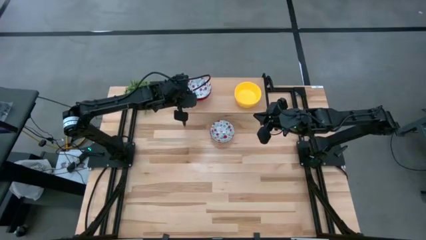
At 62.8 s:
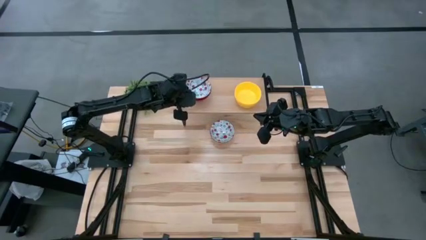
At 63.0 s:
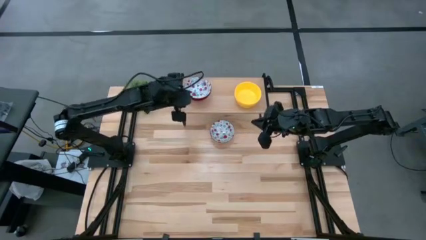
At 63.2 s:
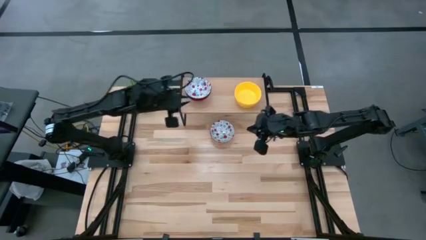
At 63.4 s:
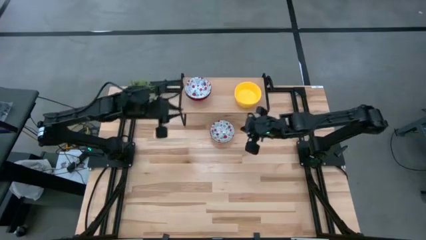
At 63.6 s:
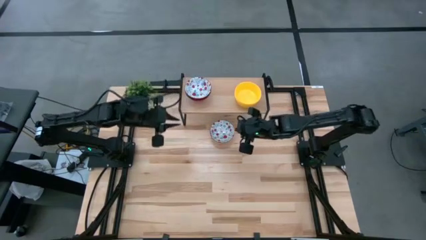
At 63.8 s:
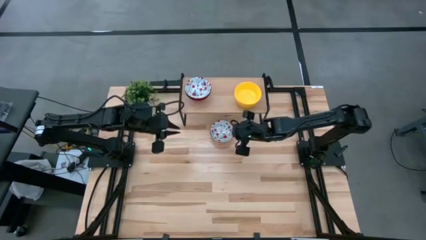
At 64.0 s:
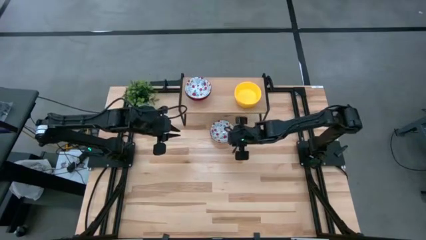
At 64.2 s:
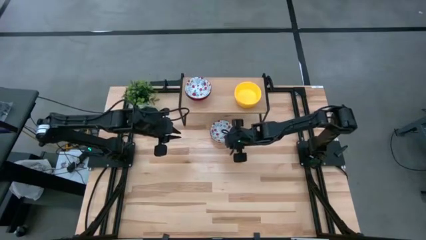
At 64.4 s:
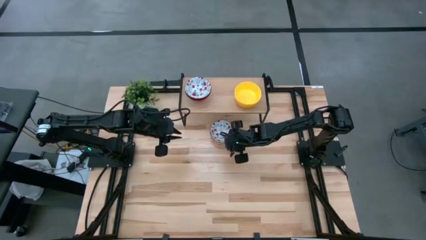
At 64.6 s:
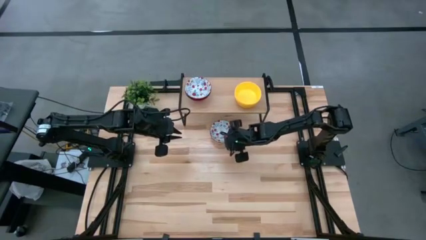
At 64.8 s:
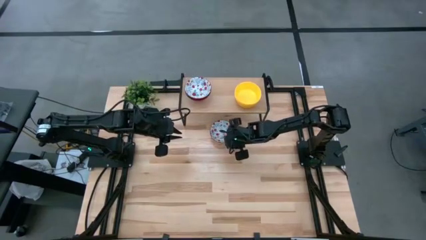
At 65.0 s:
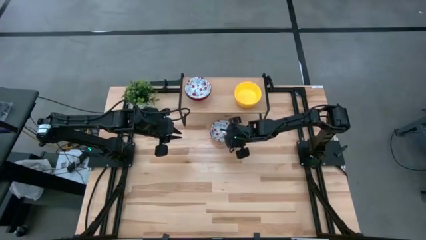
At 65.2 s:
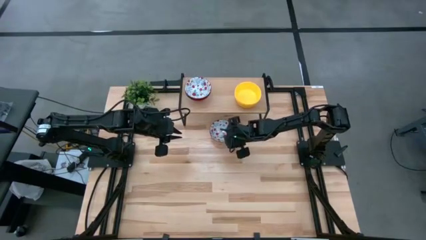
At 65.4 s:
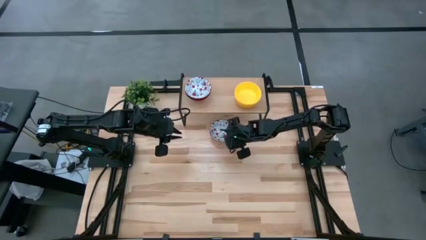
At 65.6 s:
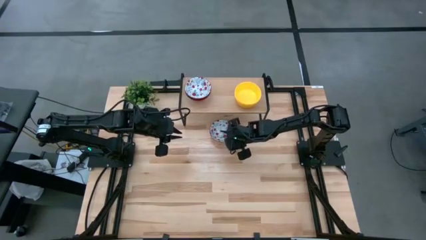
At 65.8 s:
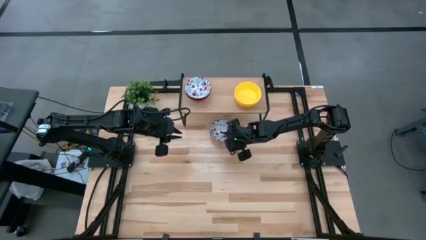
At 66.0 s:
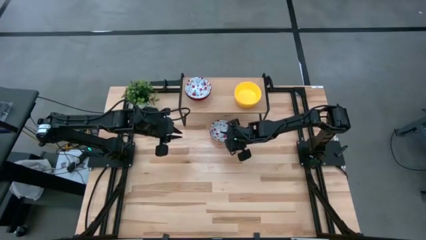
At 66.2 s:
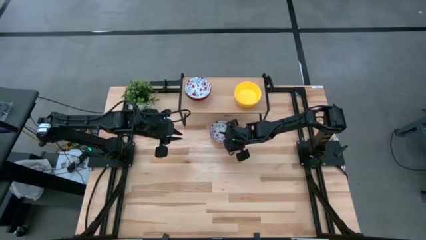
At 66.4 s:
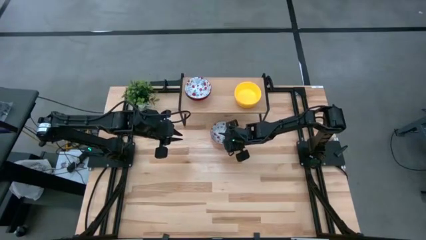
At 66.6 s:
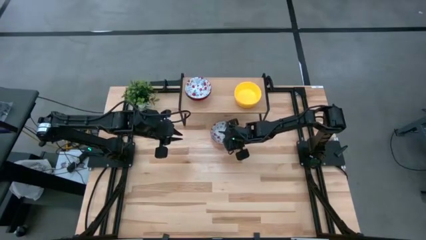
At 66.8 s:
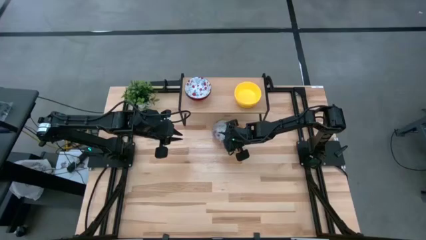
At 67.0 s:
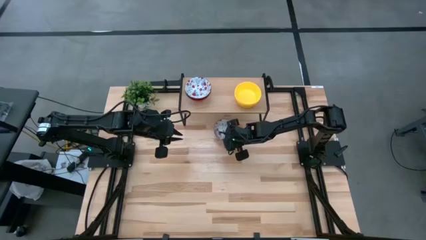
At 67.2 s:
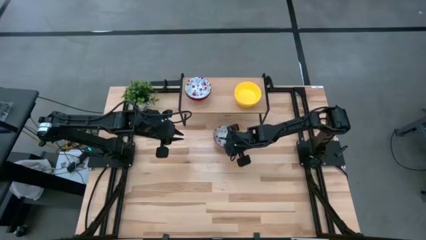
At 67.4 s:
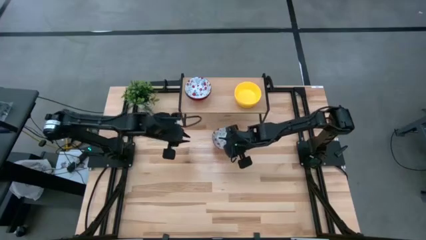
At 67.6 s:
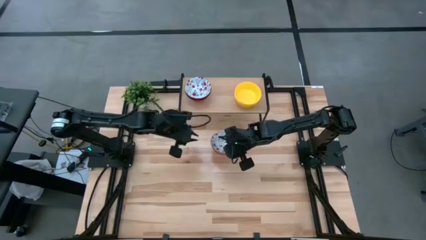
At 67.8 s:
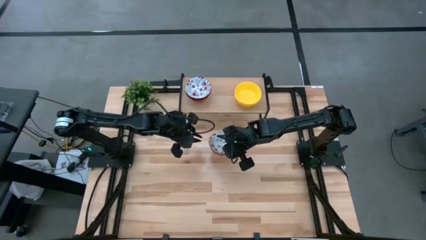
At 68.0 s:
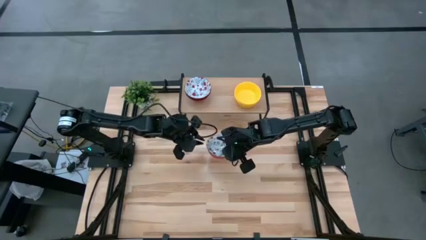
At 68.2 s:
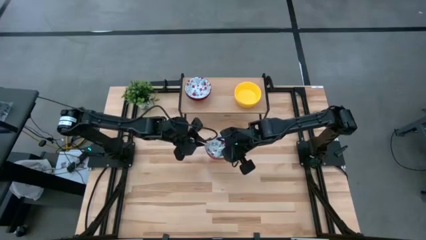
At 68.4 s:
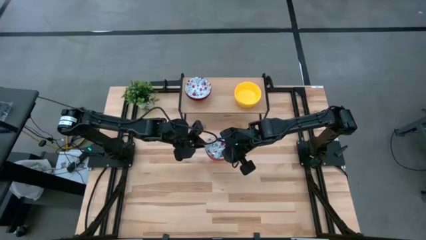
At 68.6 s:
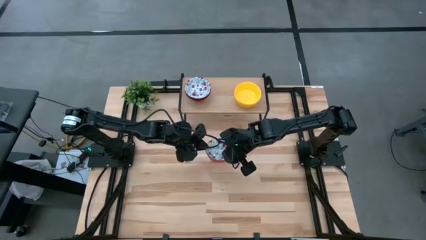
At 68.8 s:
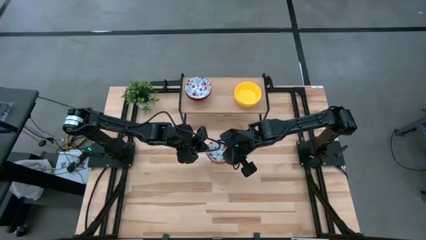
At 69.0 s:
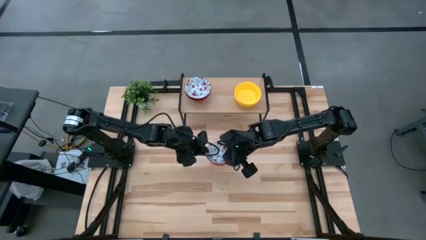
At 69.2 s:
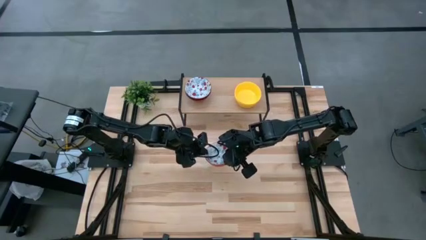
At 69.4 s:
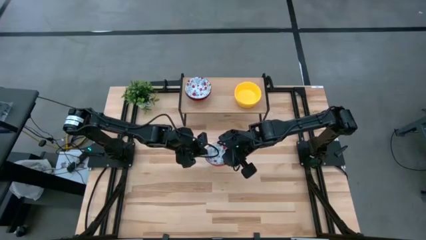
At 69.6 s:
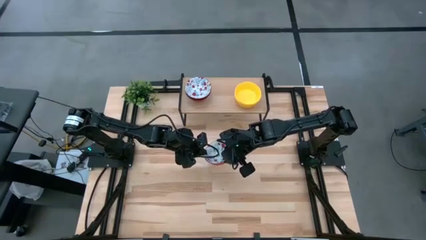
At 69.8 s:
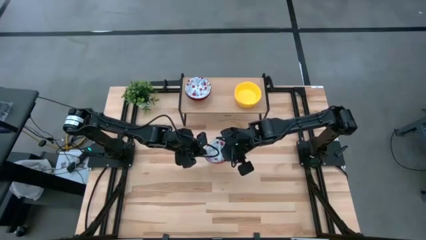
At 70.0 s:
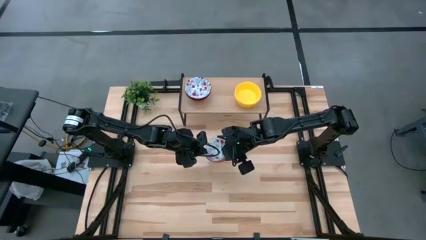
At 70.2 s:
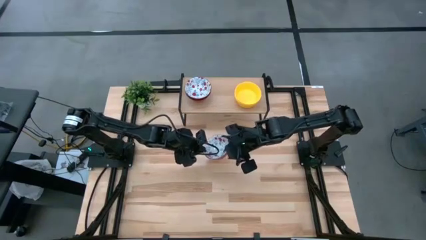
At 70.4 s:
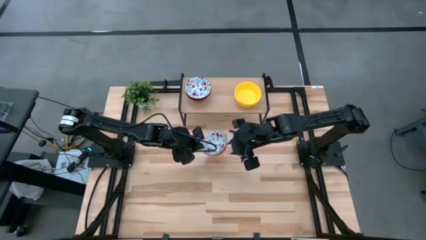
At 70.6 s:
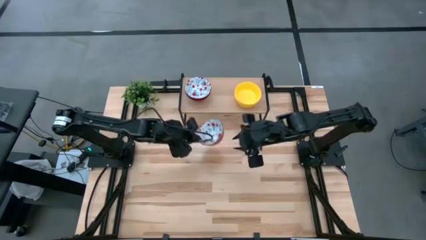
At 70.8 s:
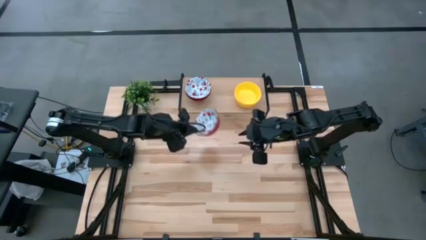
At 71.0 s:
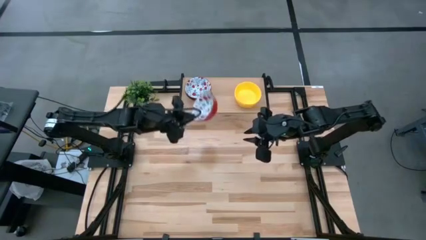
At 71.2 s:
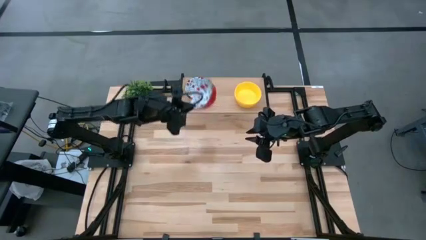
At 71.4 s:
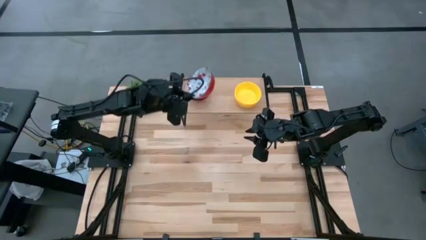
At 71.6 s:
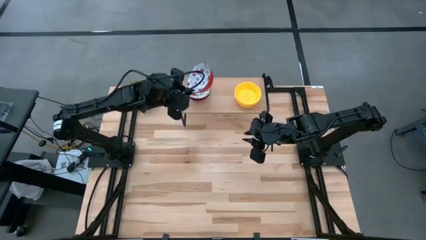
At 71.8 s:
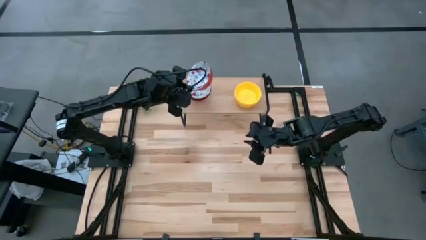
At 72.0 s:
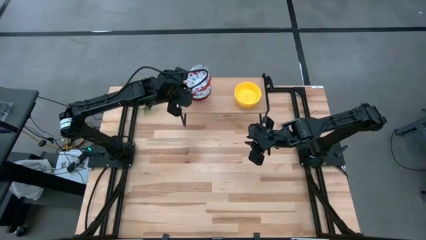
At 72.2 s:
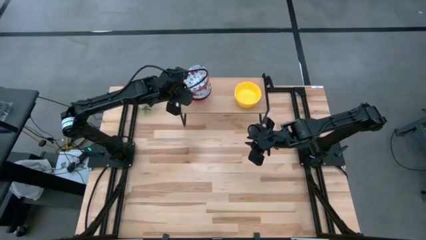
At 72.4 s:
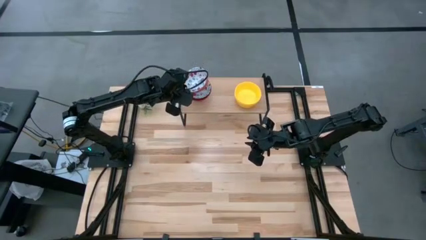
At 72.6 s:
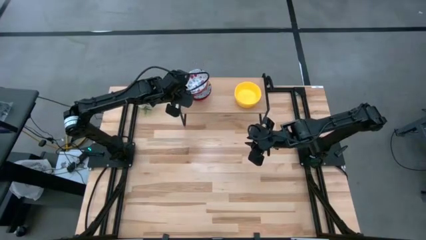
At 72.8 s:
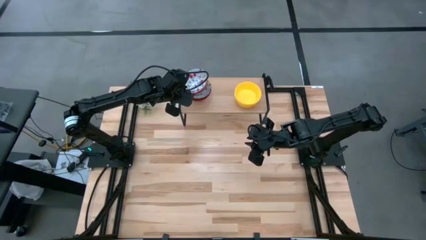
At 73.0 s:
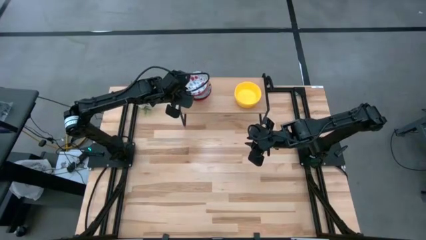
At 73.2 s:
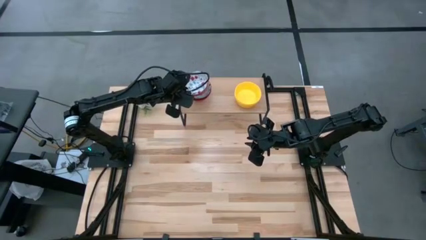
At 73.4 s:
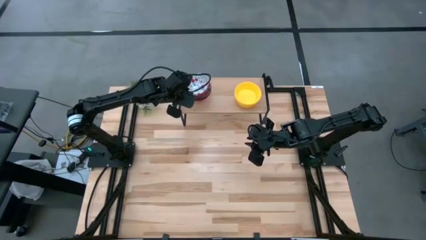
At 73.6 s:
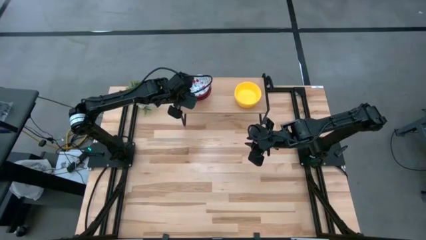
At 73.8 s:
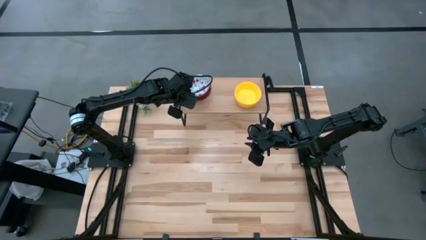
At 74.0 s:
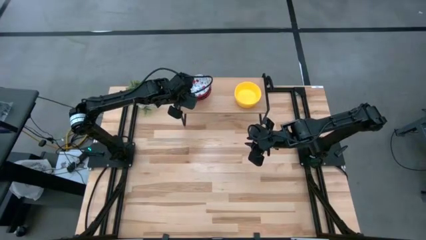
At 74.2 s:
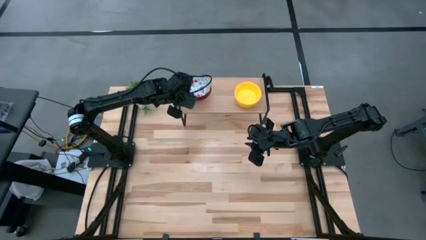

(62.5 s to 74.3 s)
Task: Pick & Place Mini bowls
Stack the printed bowl on the printed bowl on the shelf

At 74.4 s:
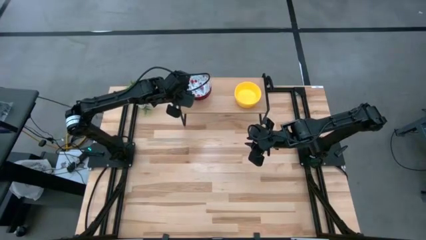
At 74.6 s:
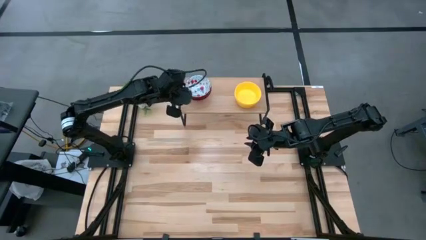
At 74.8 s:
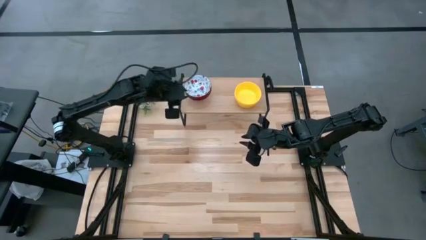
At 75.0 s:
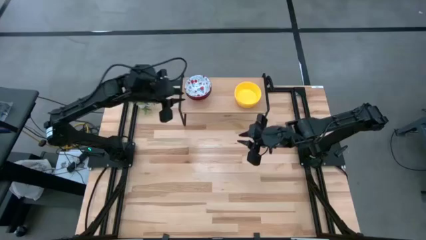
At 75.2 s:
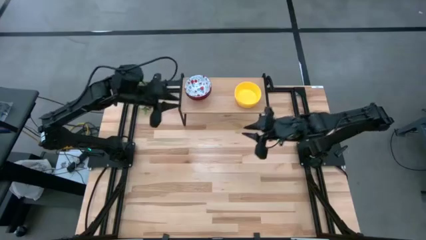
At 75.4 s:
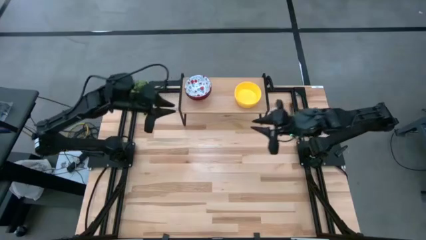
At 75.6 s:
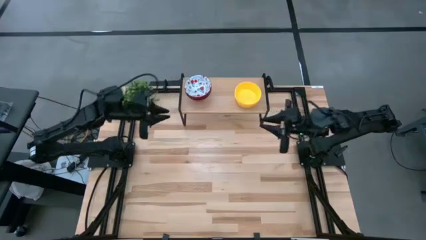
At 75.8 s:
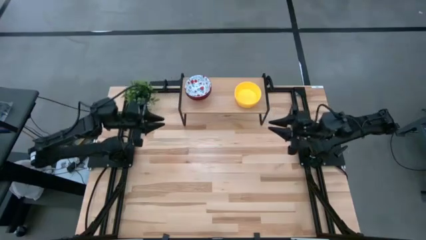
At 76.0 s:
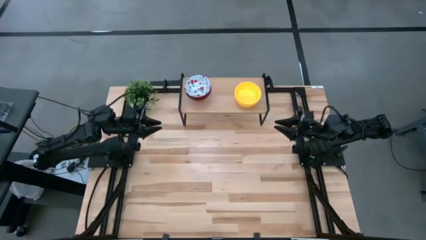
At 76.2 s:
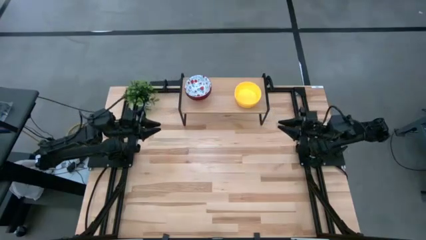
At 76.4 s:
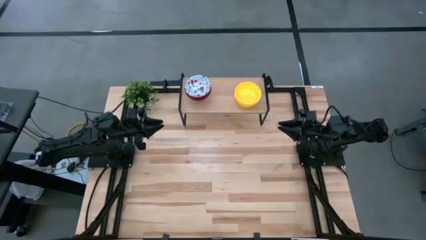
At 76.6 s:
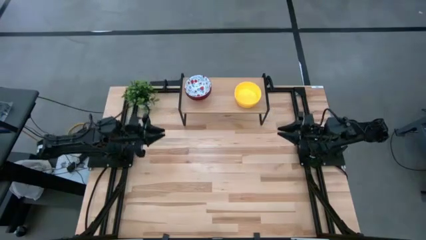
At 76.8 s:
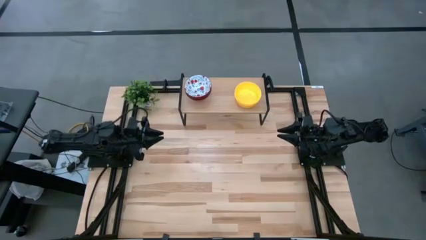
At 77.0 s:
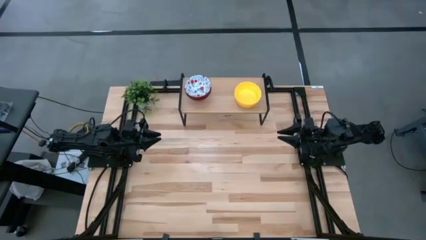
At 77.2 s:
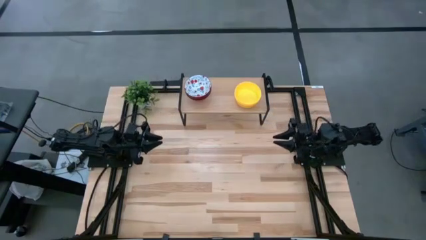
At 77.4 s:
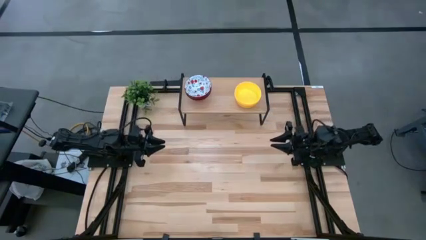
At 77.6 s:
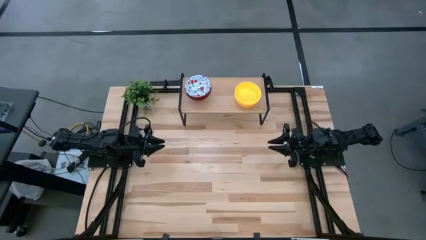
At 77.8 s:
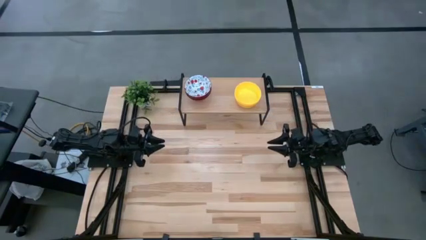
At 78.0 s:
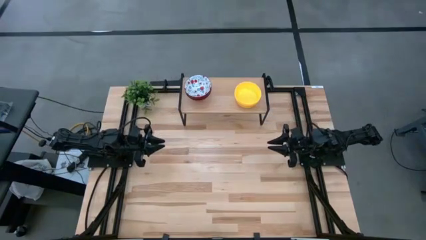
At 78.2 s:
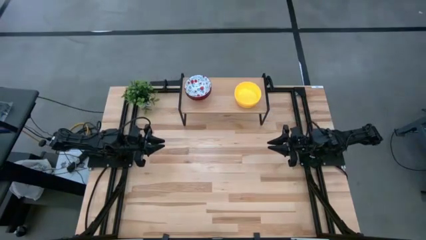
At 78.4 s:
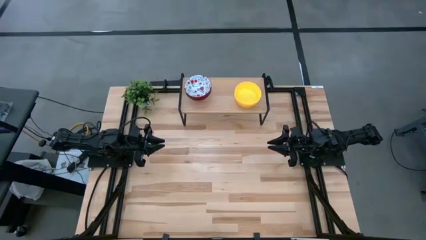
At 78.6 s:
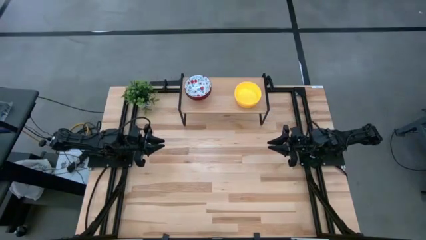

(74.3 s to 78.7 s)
Return to Home Position
